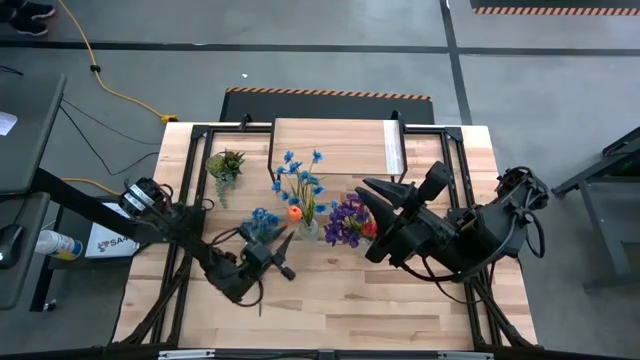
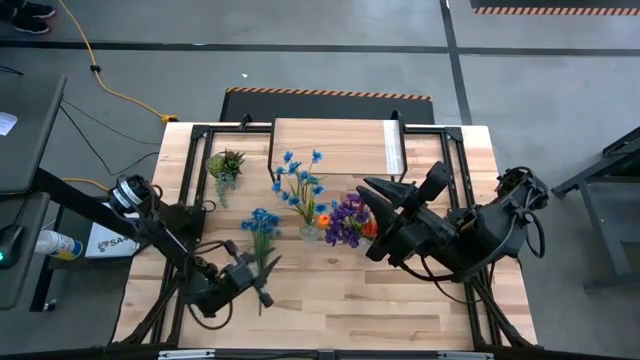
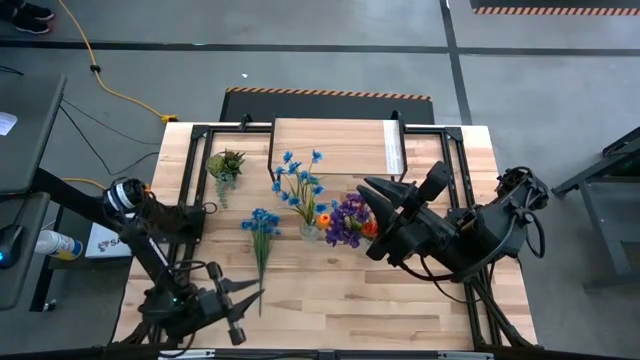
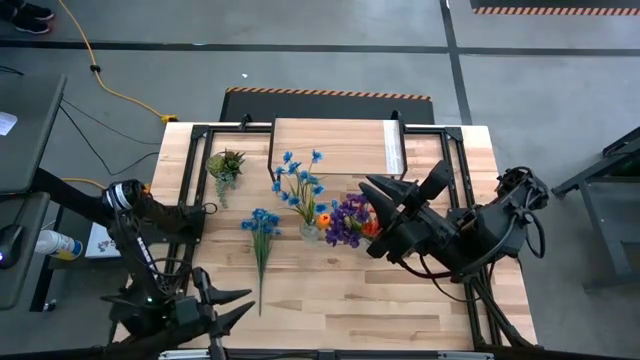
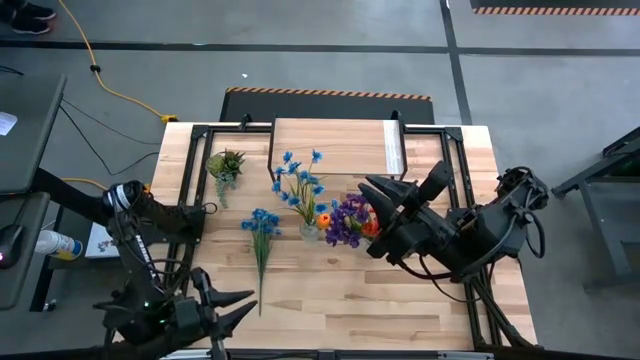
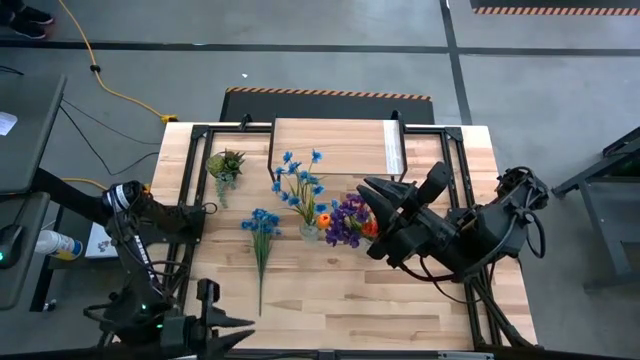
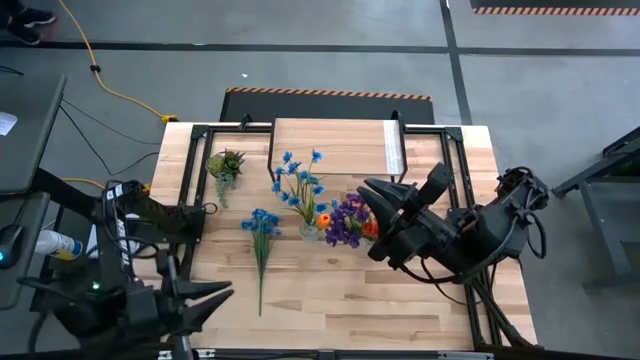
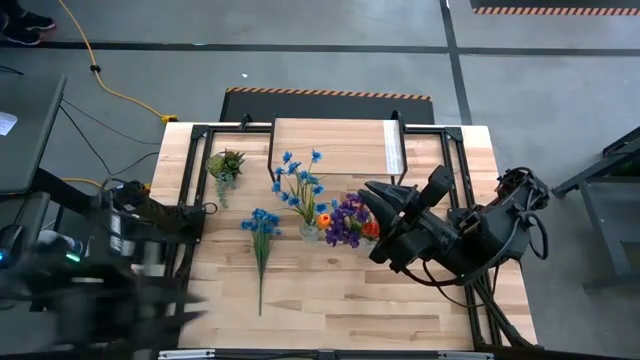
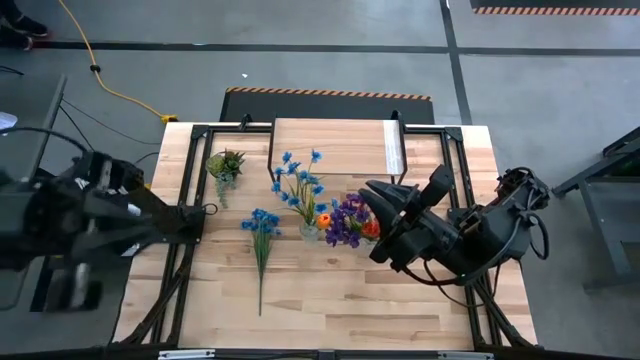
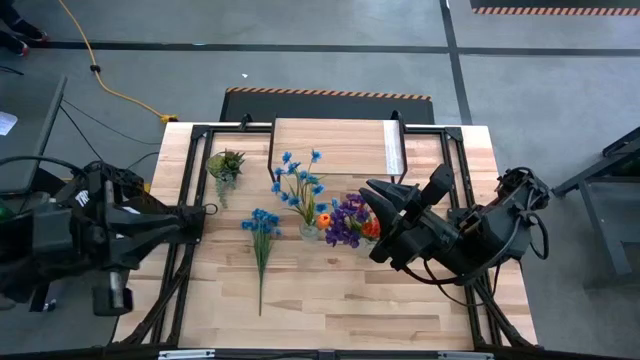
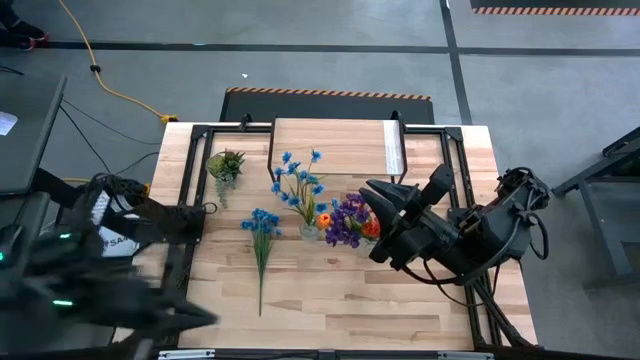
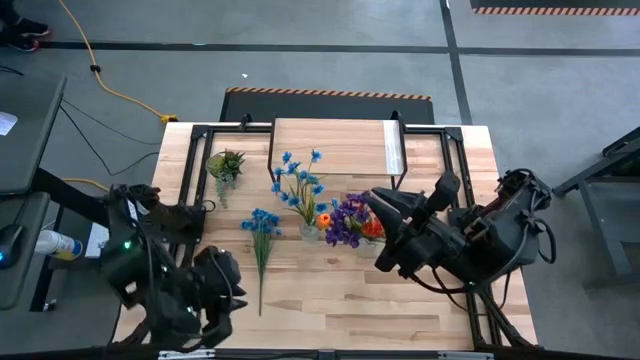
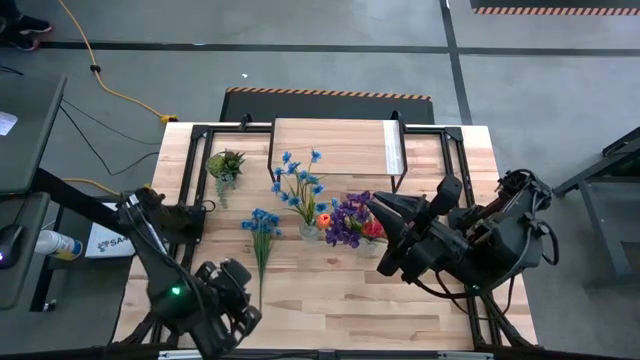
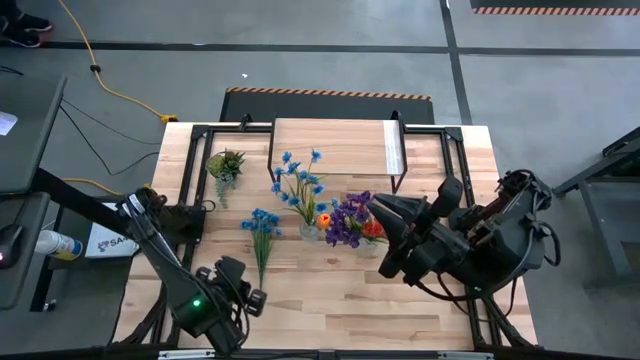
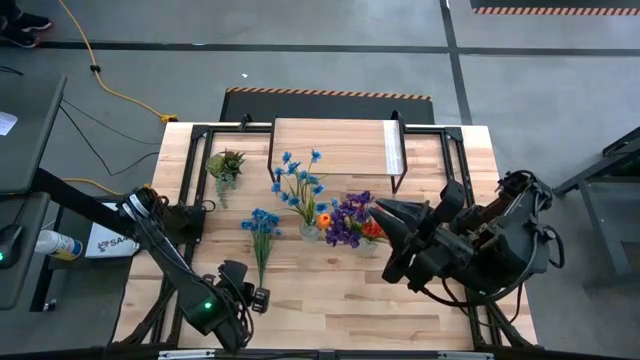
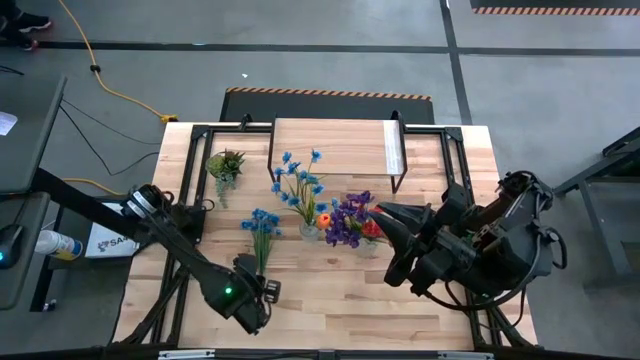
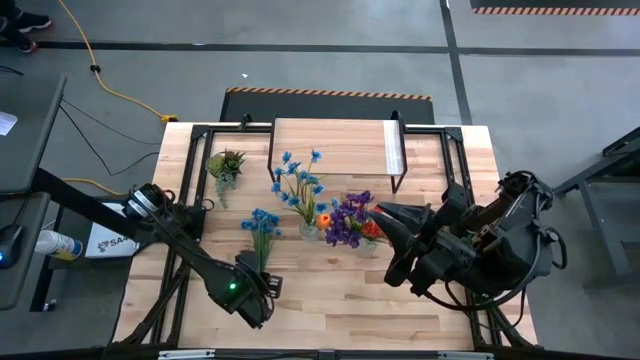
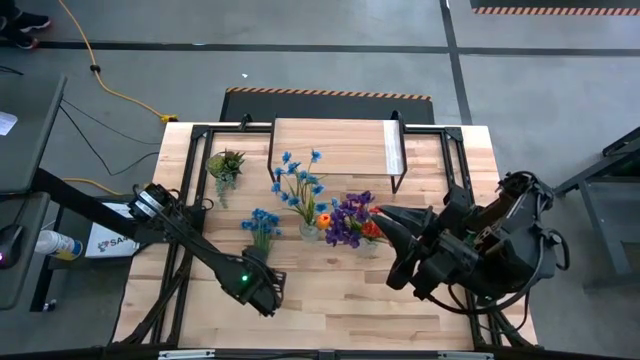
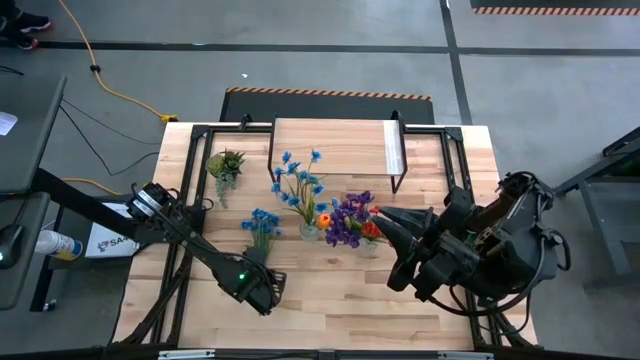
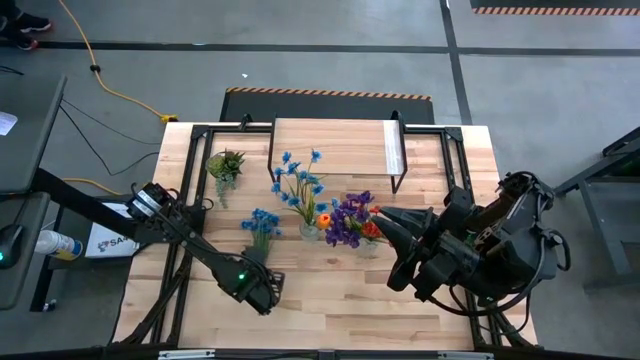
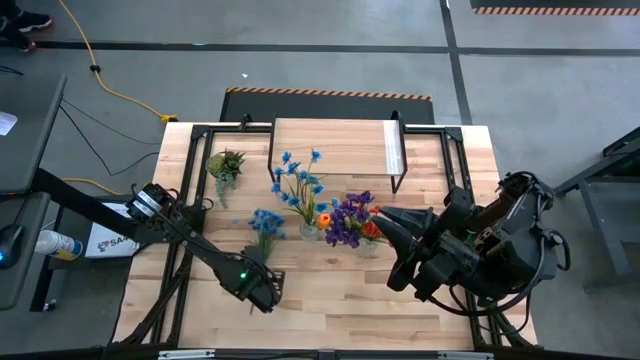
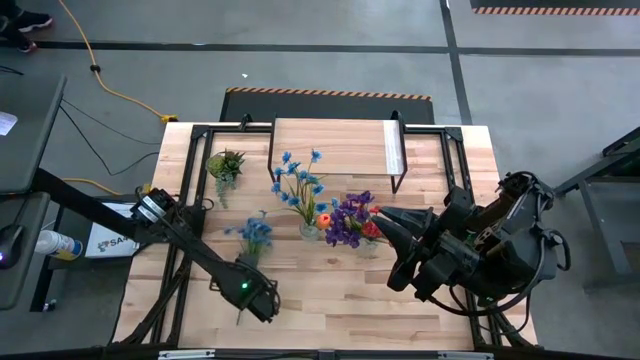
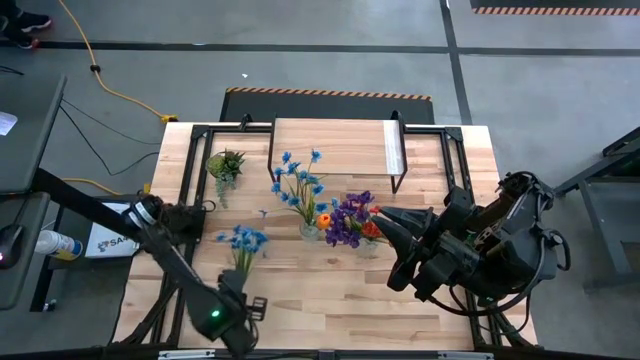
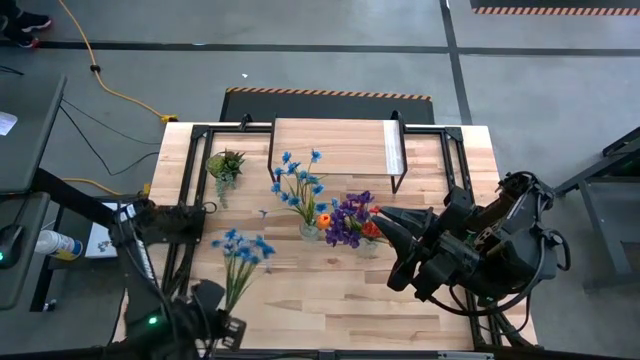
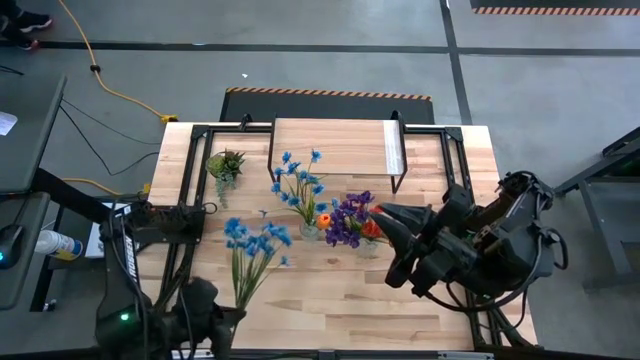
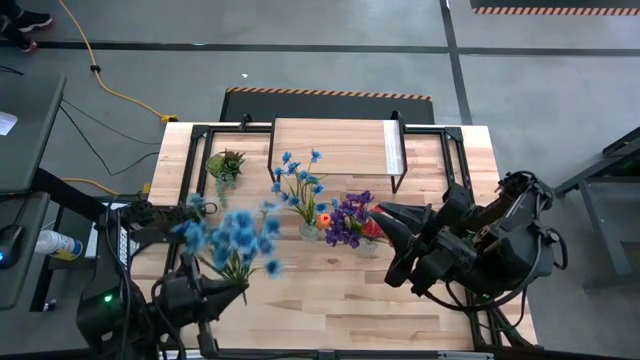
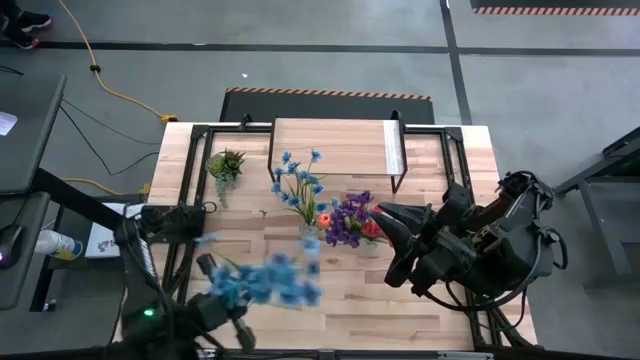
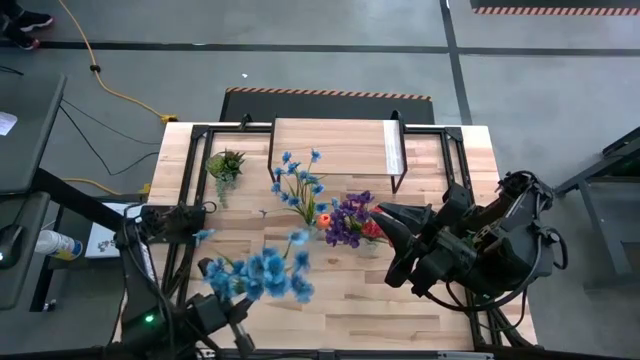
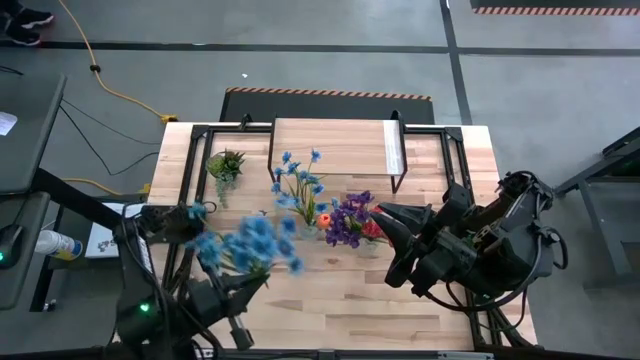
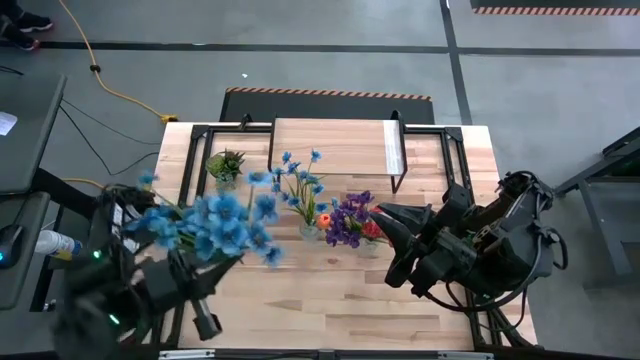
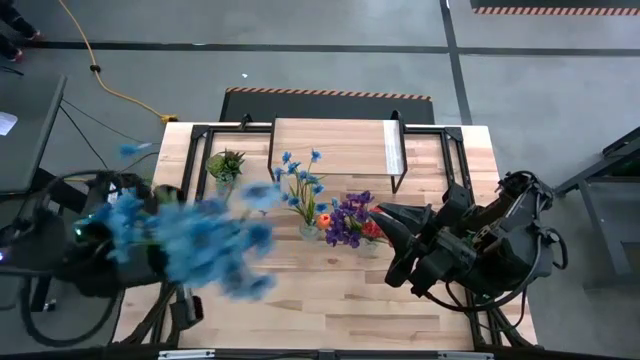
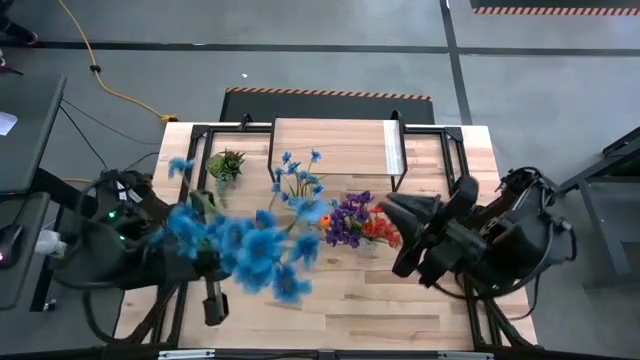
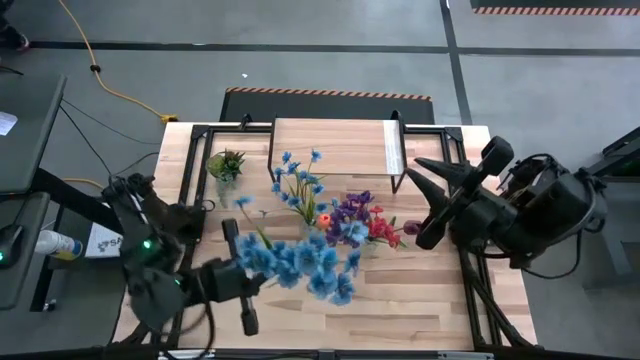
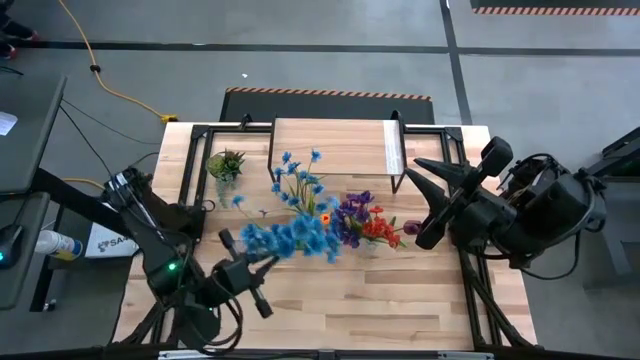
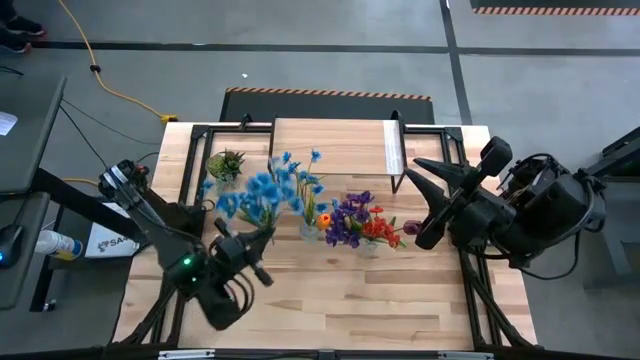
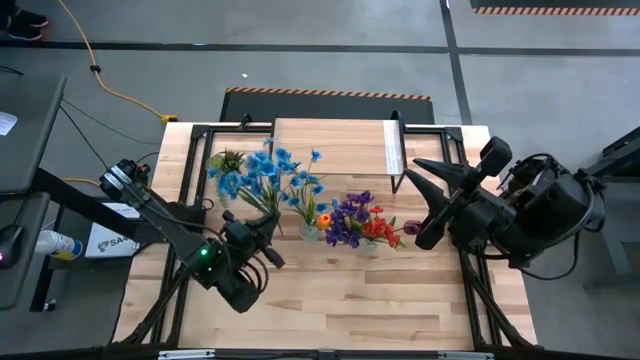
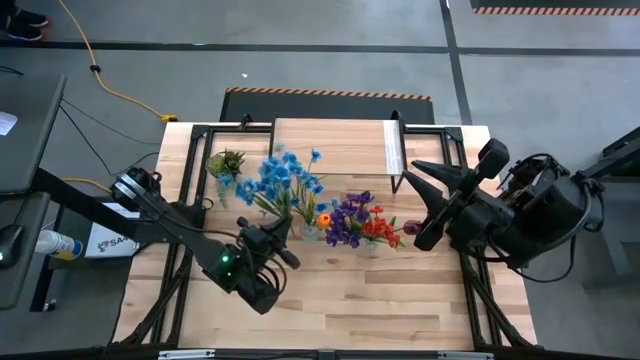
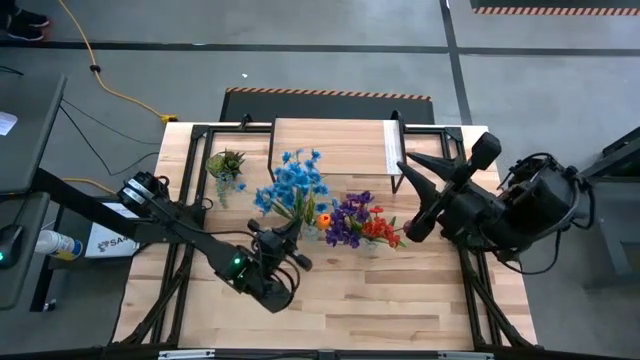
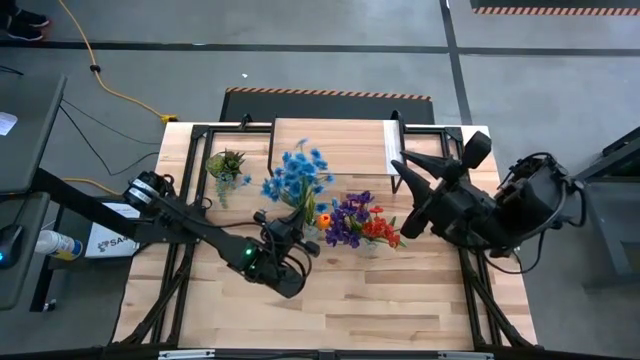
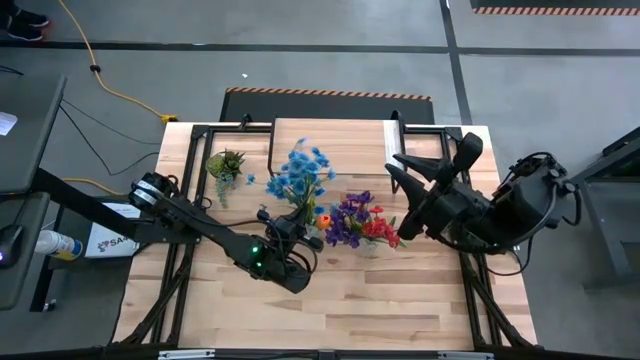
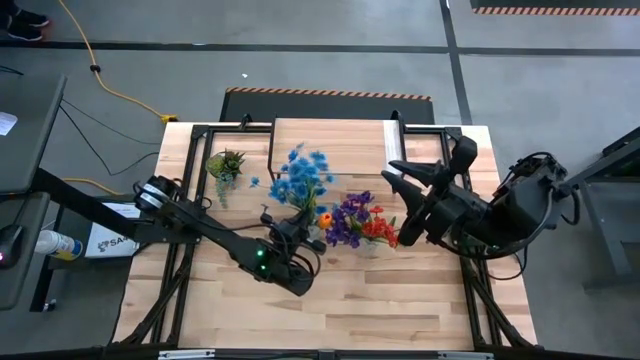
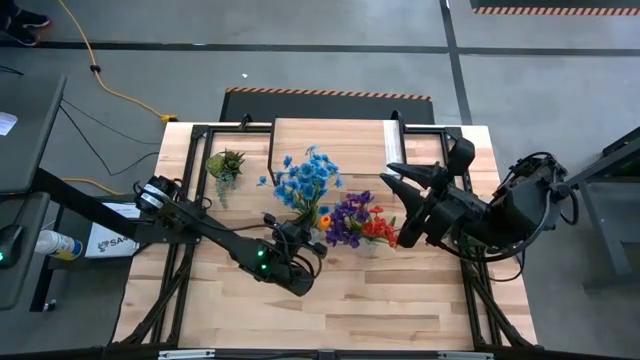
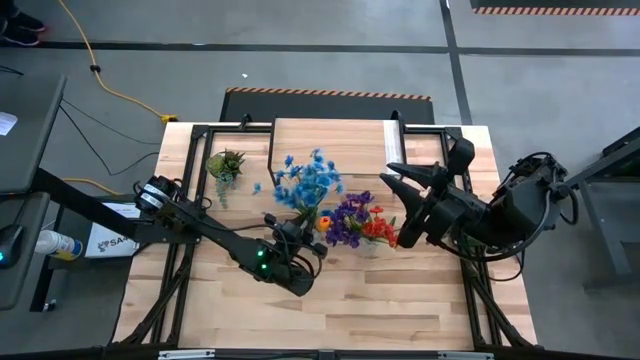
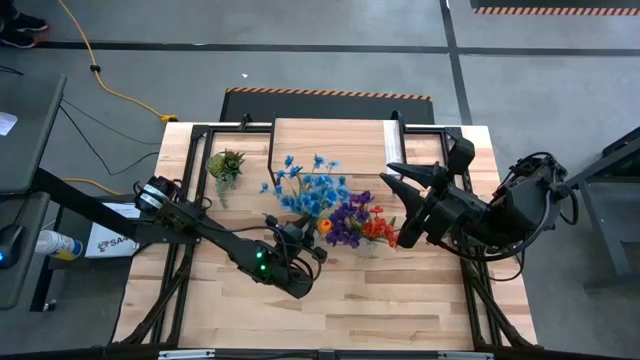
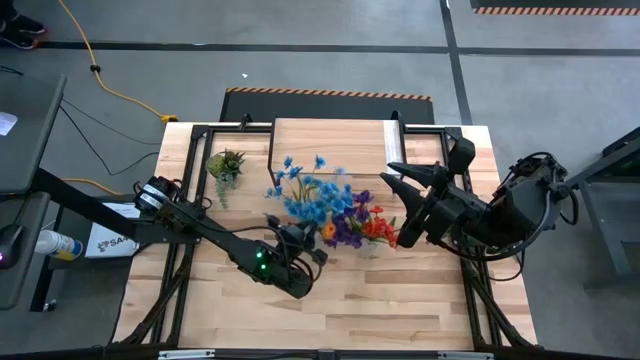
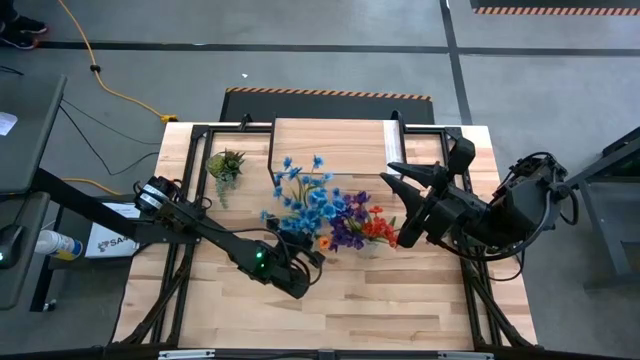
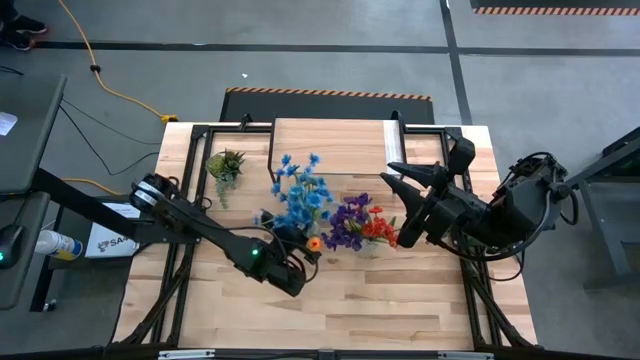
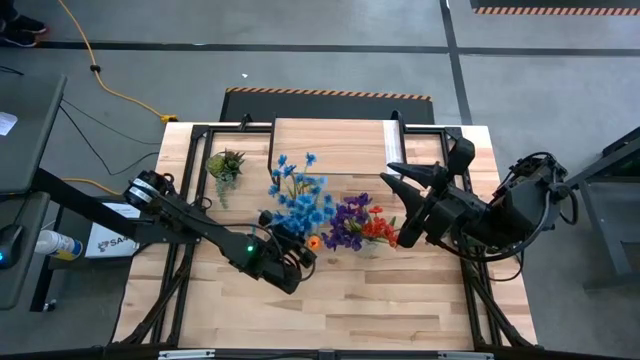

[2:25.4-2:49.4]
Task: Pick and place flowers into a vace then onto a shelf
Put the blue flowers into the left transparent flower vase
